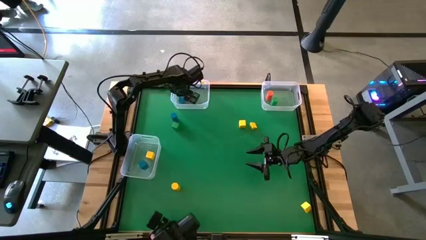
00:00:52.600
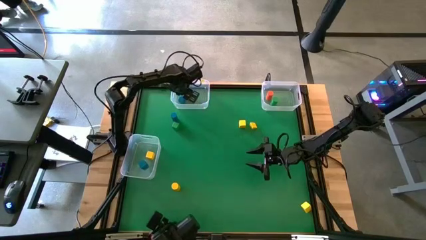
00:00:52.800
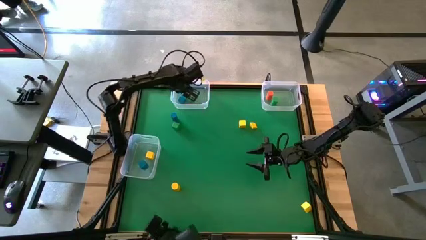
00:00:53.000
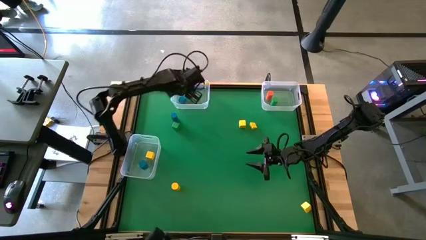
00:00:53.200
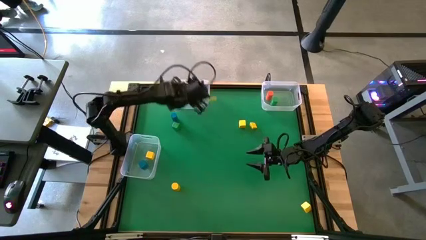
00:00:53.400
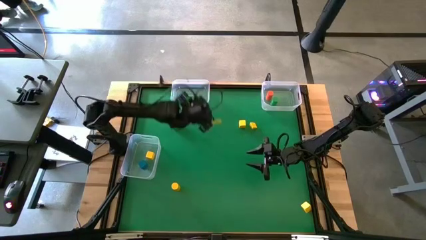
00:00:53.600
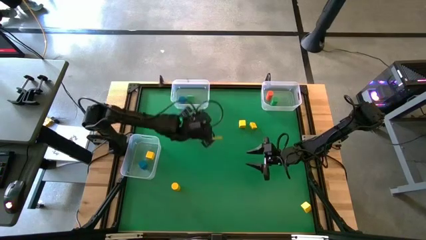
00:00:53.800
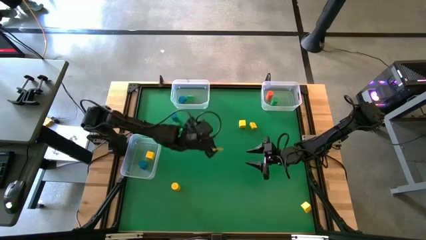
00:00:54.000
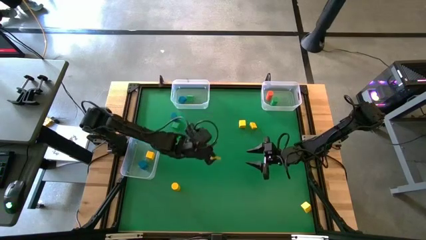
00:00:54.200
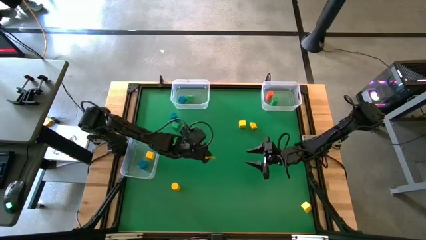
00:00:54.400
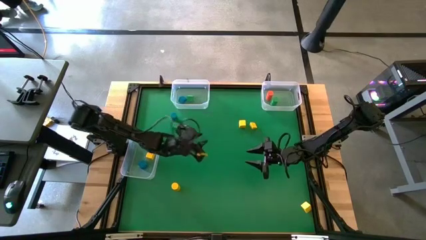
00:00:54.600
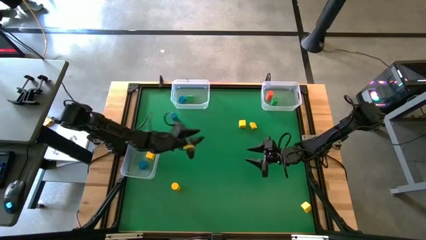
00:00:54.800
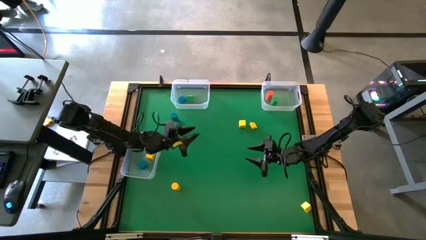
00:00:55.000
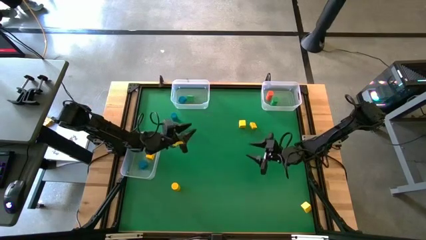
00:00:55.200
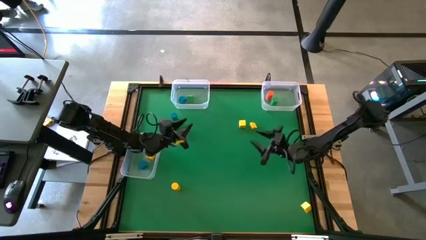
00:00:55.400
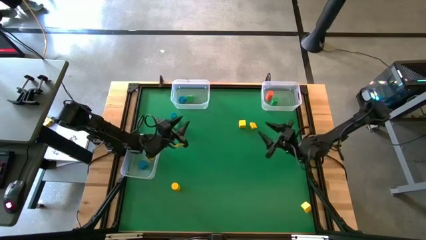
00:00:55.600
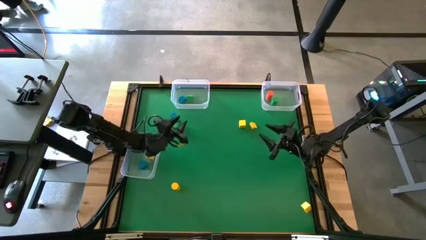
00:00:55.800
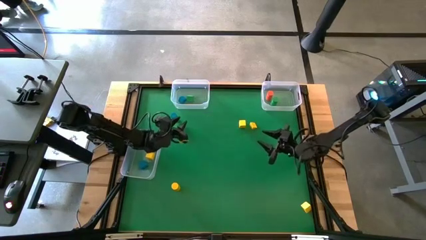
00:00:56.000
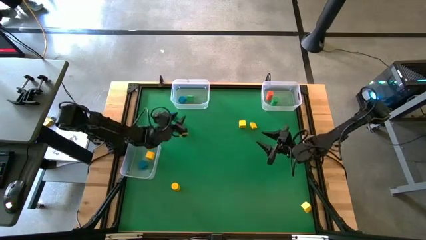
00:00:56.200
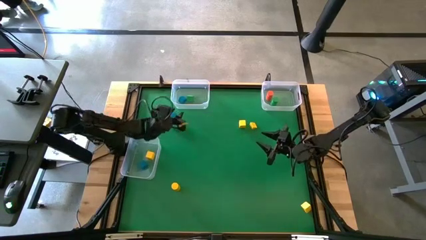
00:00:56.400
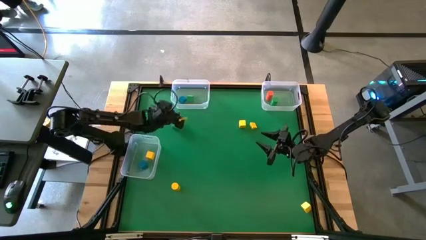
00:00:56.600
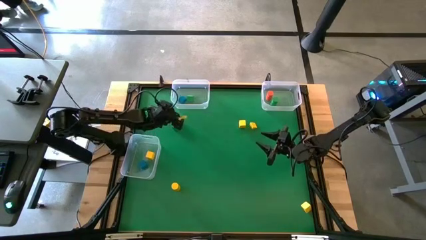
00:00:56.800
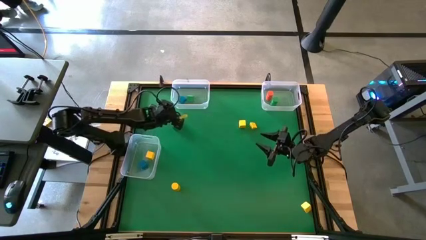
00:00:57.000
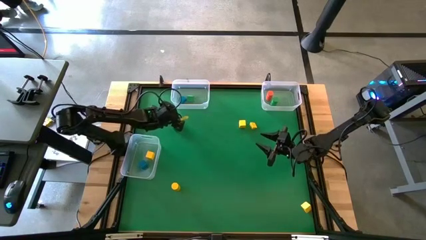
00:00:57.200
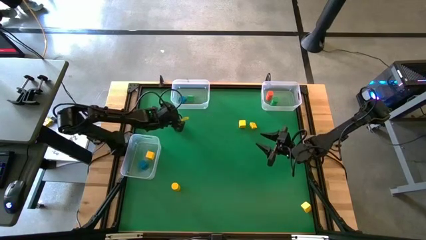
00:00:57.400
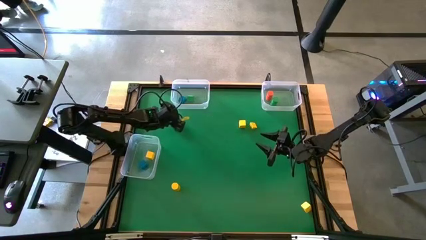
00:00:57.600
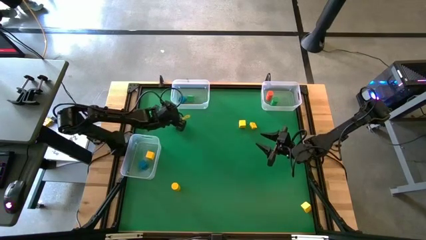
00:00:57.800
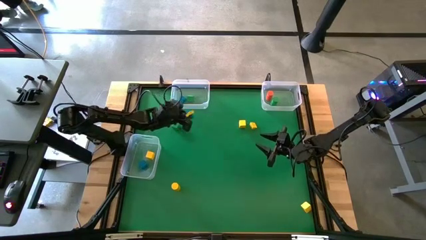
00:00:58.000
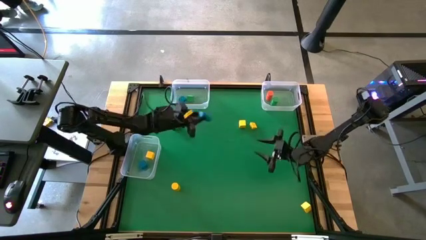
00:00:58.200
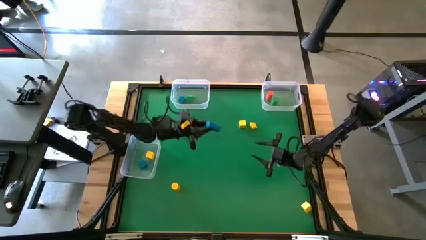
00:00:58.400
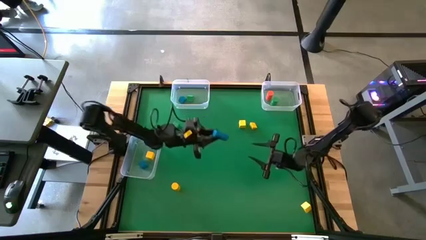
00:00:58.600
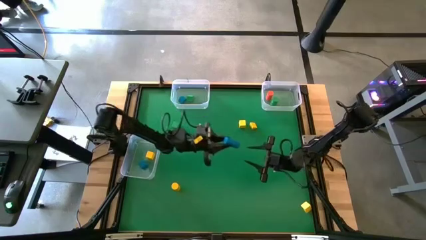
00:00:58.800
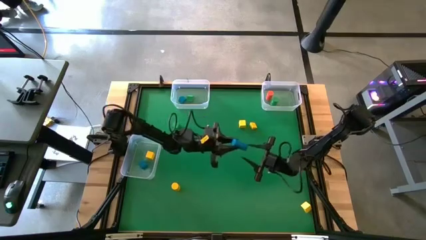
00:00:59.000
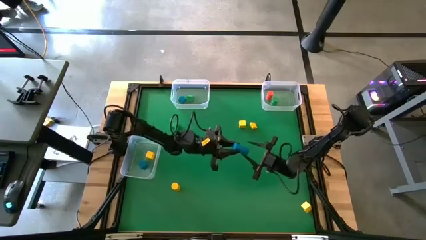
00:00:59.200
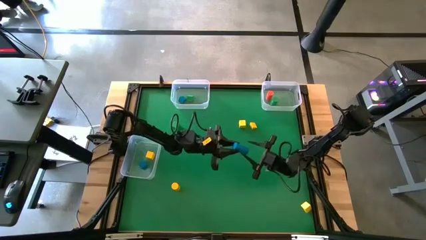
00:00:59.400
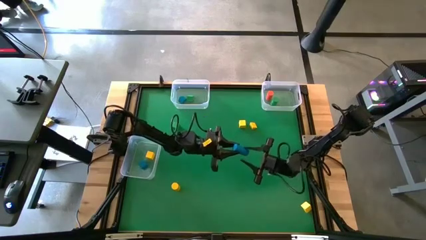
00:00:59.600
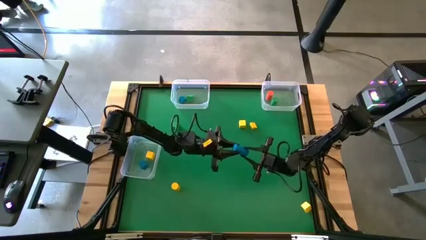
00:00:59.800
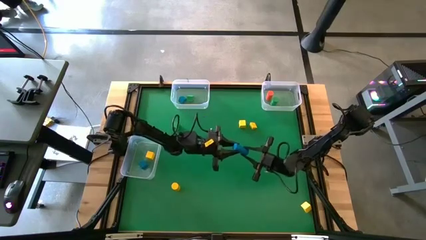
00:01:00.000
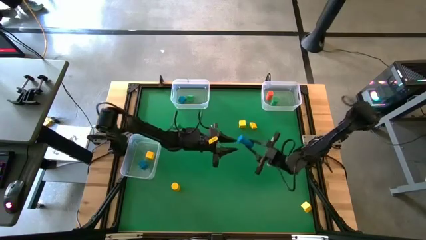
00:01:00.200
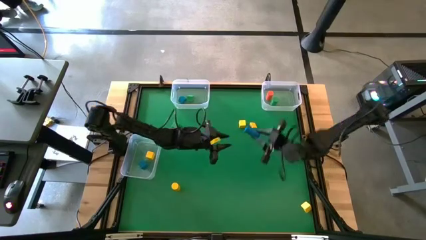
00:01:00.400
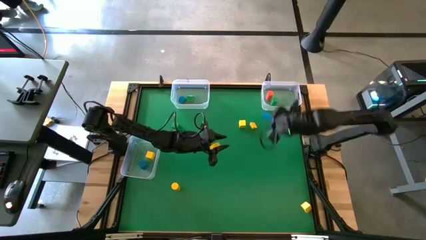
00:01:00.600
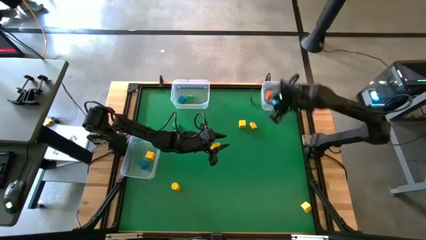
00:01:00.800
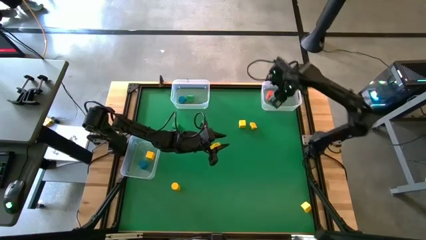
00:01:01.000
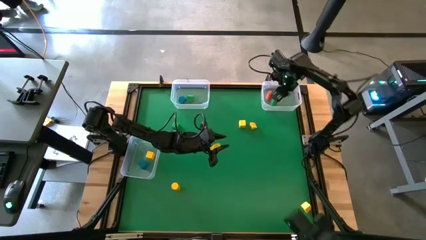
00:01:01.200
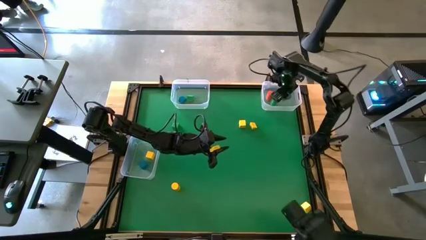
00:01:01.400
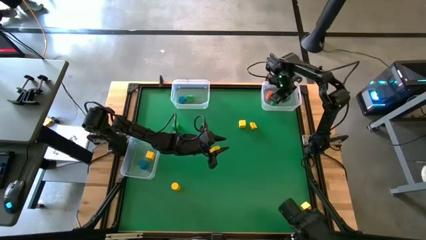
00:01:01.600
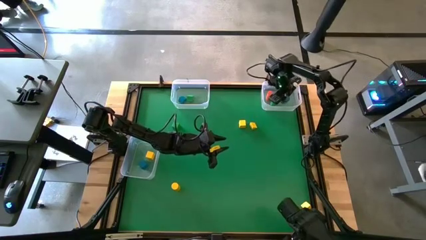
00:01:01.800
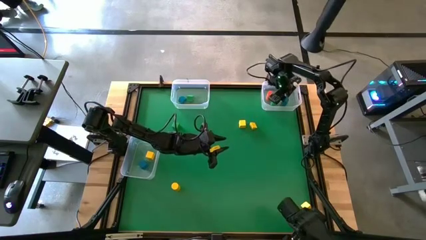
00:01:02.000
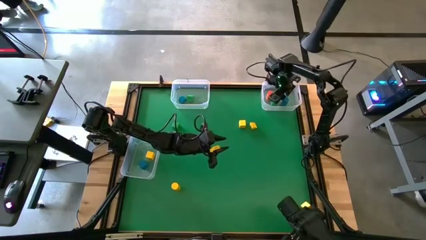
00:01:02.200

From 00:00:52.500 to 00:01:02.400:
Task: Sort blocks by size
Put the blue cylindrical block into the top right transparent bin

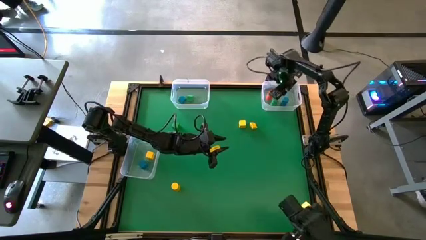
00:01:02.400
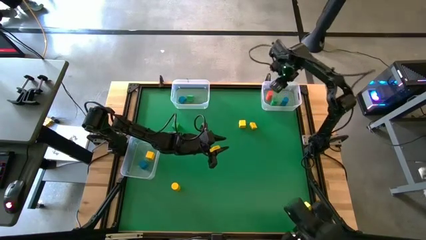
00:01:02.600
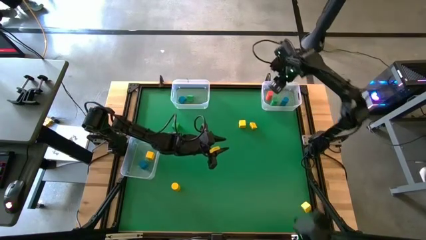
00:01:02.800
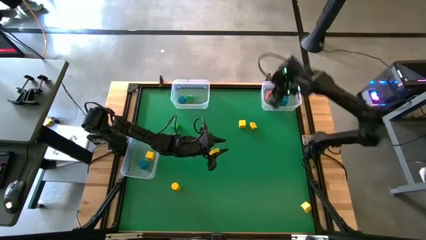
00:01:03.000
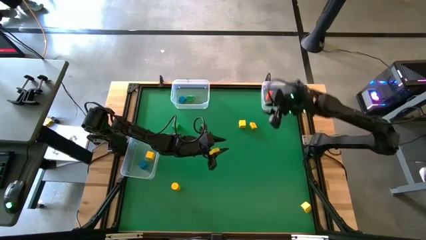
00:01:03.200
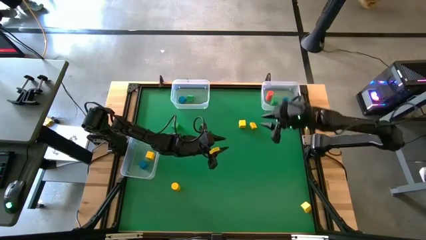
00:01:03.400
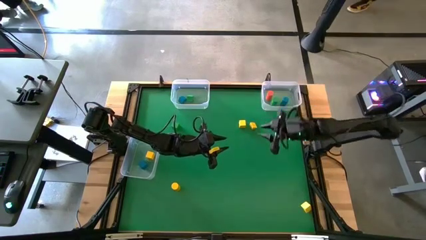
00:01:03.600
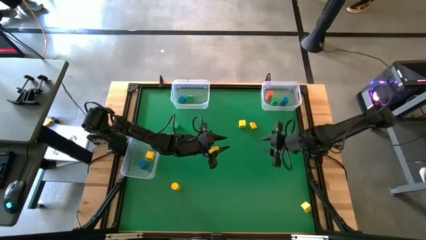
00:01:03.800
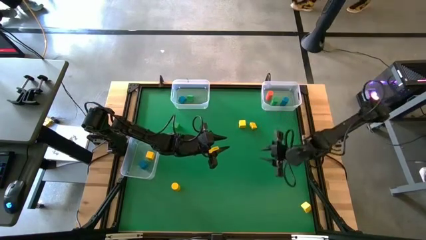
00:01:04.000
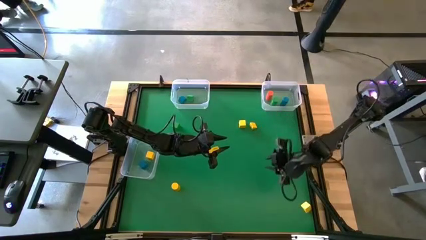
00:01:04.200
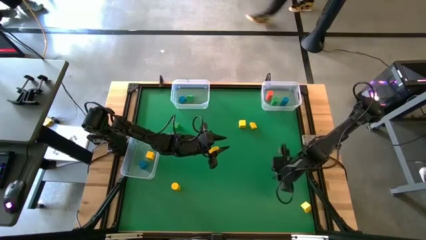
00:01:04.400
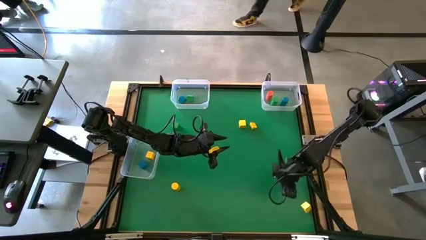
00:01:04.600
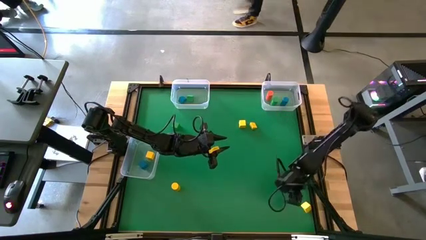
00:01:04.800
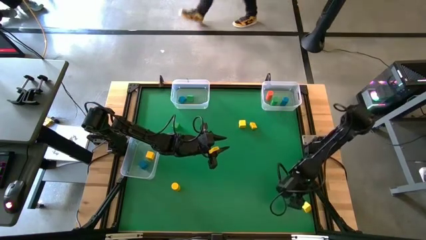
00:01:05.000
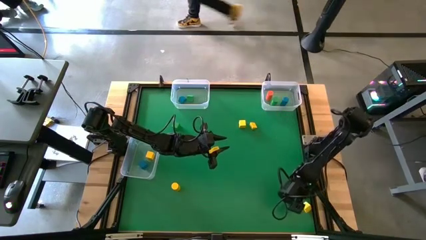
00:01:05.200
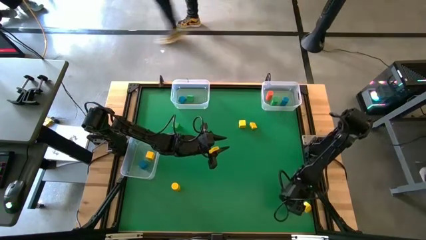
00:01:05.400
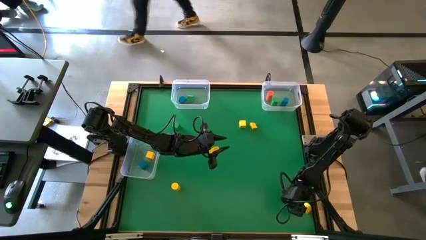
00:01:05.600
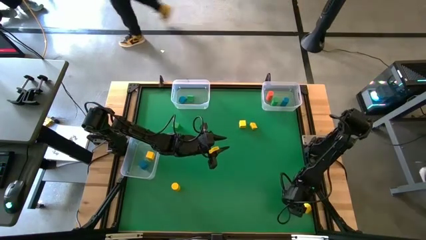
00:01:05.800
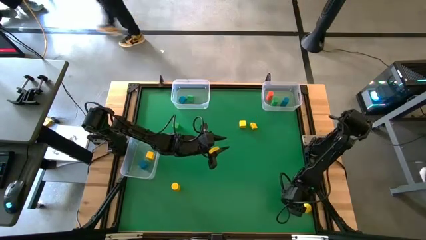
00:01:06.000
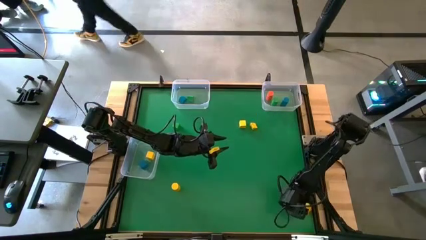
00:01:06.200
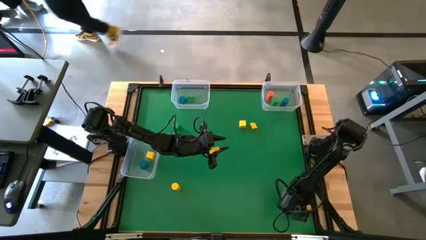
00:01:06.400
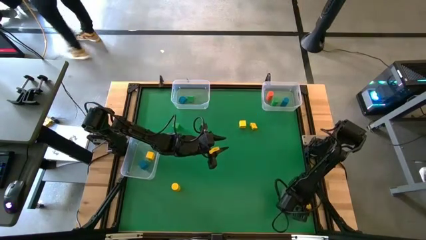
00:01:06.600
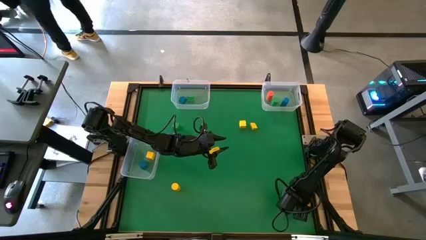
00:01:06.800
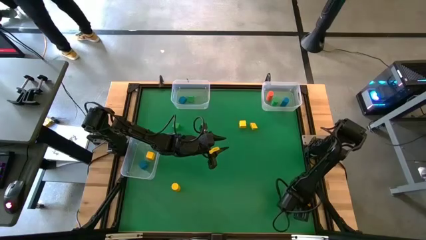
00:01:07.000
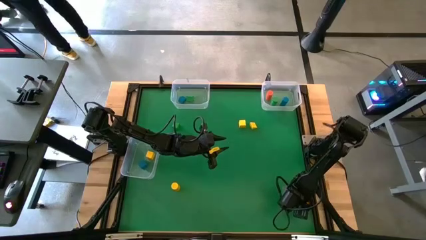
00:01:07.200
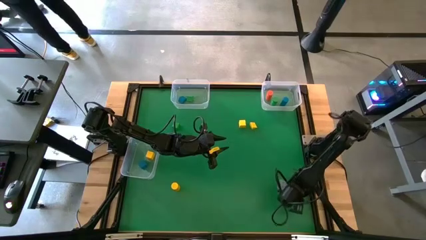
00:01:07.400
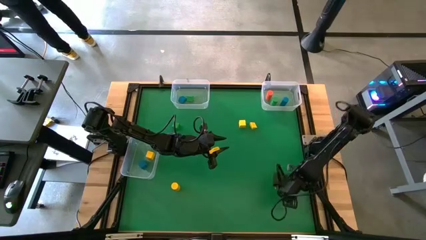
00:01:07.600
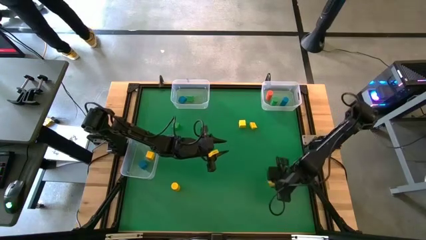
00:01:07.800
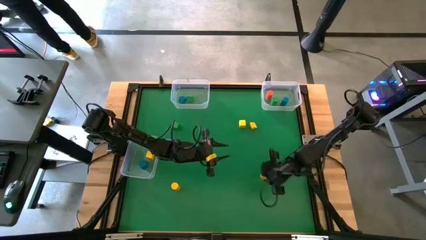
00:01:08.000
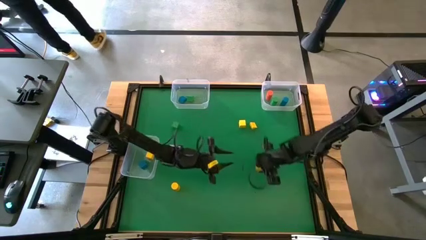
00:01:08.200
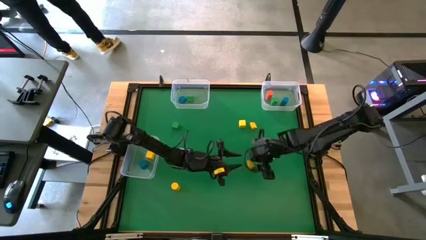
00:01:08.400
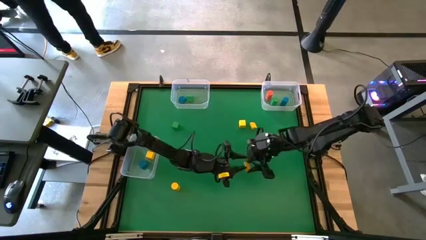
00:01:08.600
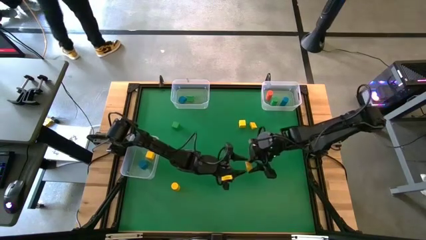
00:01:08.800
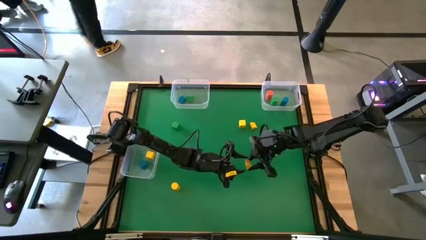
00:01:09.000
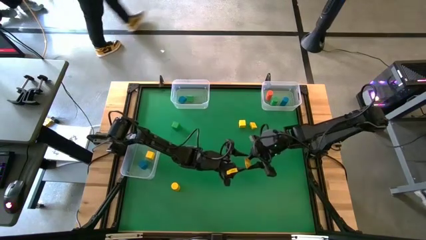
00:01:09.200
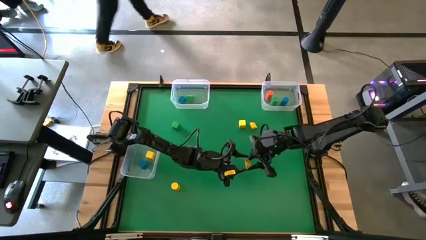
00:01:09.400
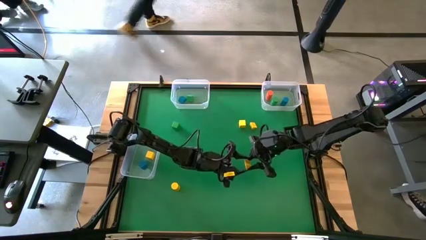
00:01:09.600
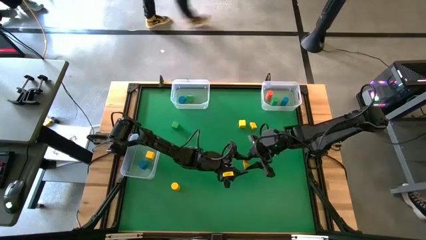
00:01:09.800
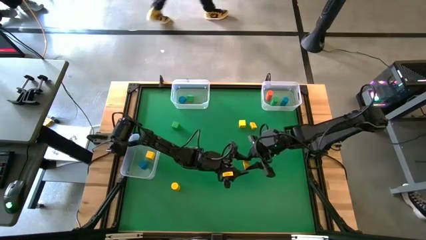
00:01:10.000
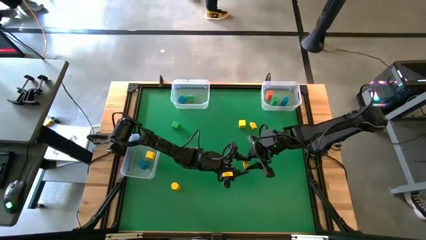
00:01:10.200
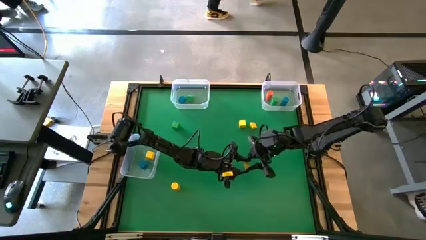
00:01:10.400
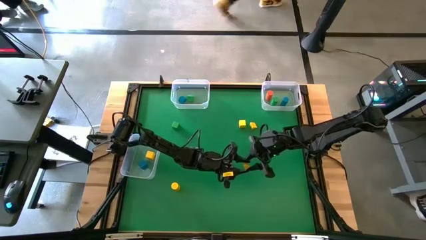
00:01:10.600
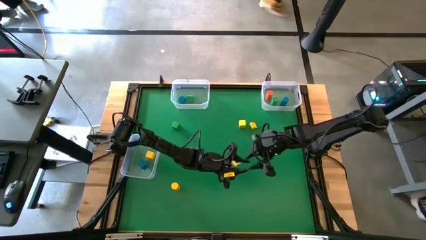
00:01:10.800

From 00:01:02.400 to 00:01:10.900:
Put the yellow triangle block into the top left transparent bin
